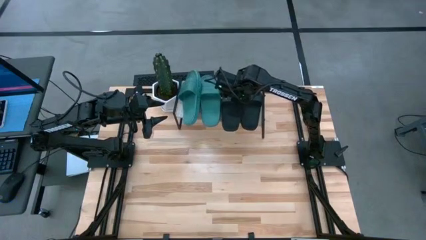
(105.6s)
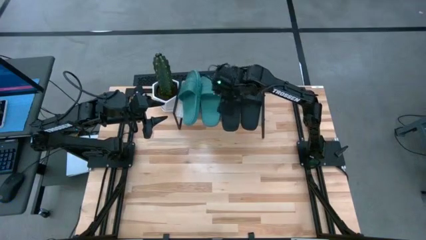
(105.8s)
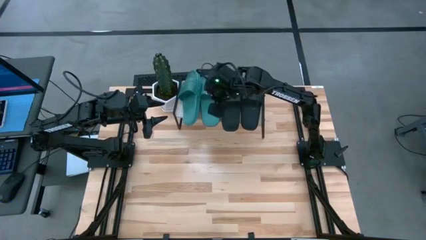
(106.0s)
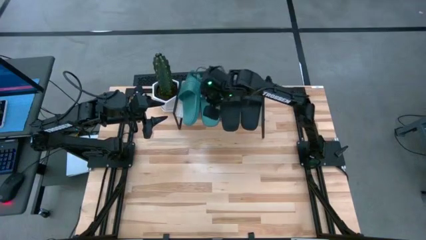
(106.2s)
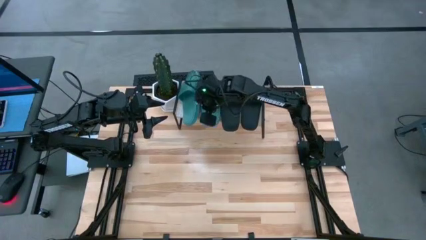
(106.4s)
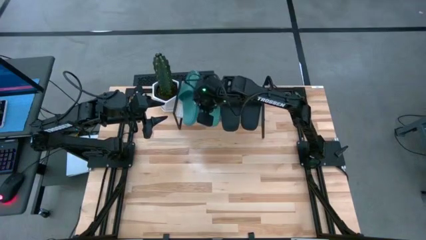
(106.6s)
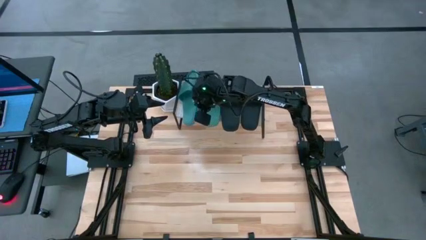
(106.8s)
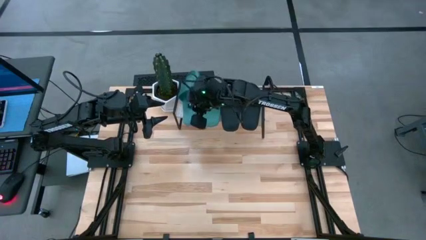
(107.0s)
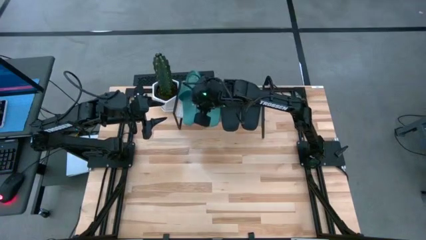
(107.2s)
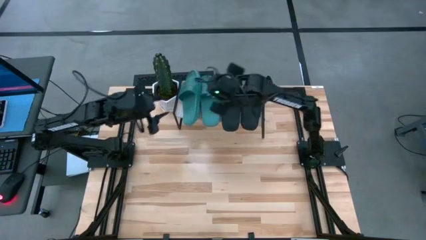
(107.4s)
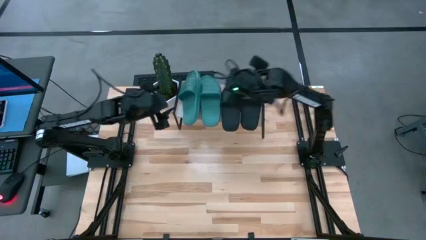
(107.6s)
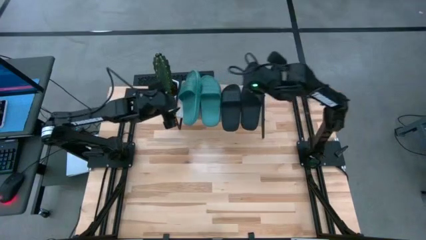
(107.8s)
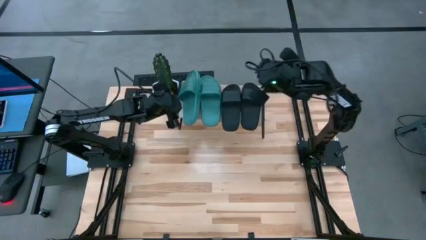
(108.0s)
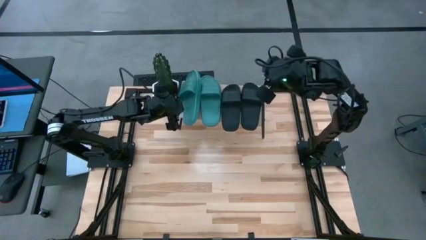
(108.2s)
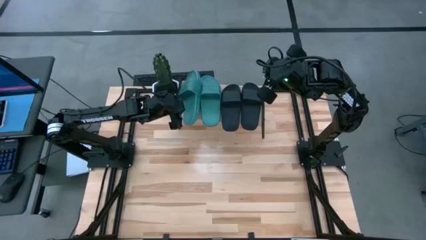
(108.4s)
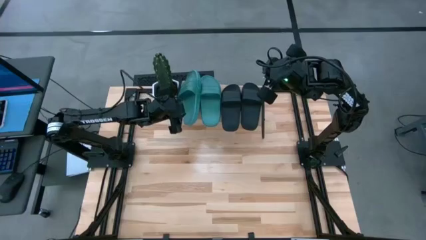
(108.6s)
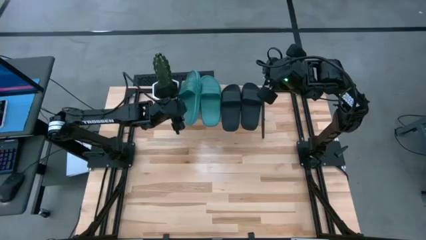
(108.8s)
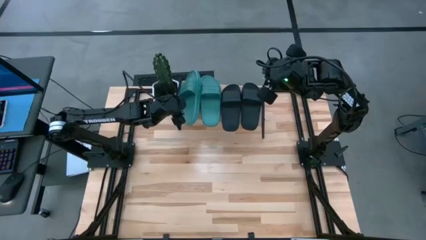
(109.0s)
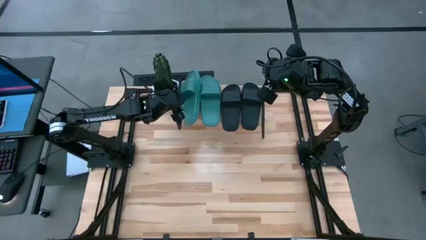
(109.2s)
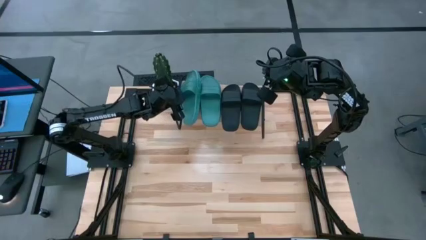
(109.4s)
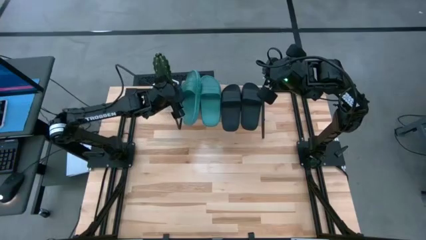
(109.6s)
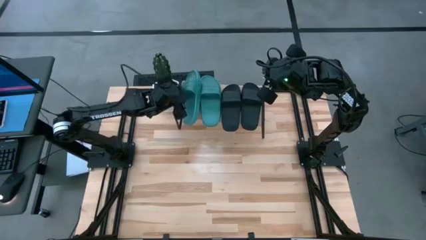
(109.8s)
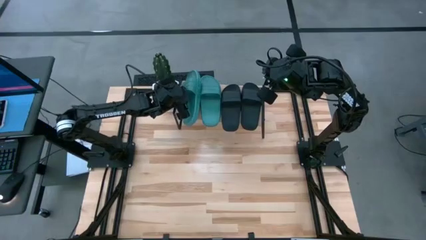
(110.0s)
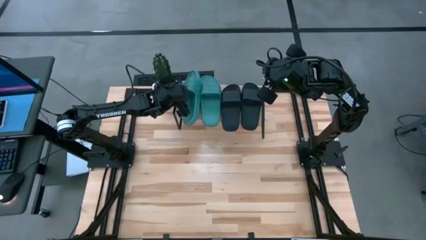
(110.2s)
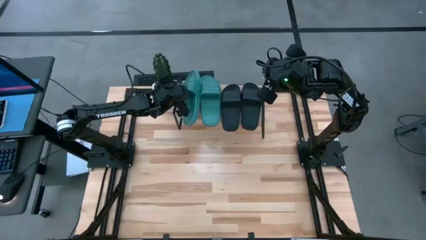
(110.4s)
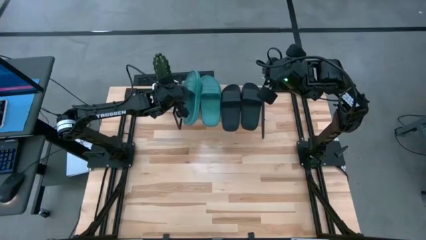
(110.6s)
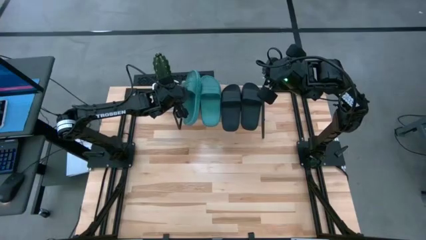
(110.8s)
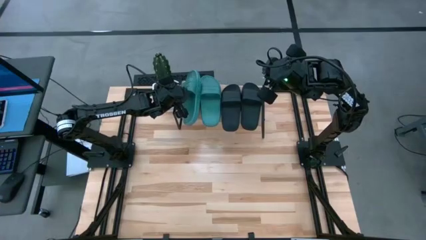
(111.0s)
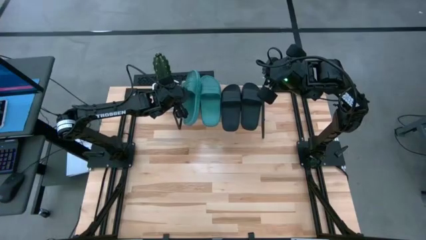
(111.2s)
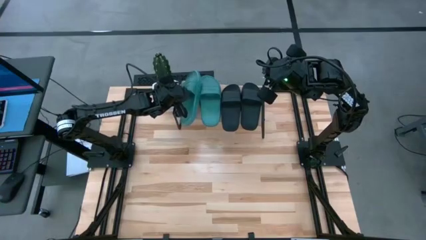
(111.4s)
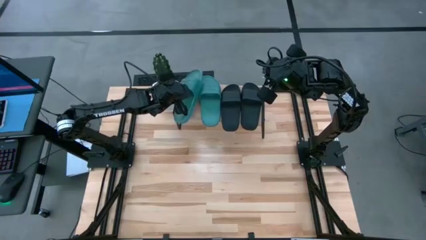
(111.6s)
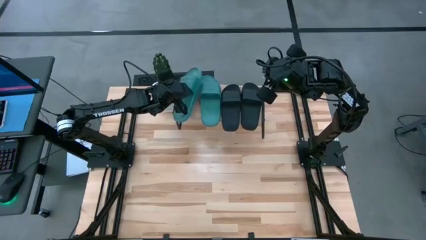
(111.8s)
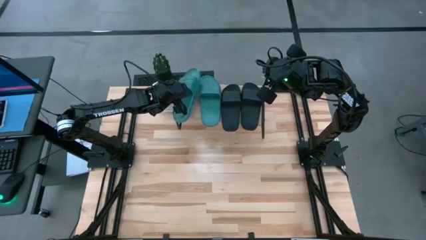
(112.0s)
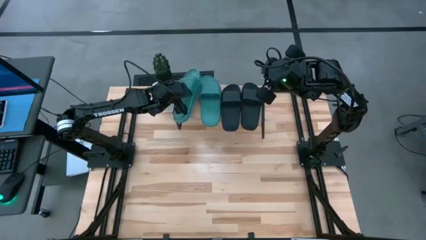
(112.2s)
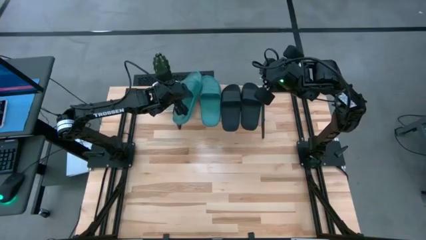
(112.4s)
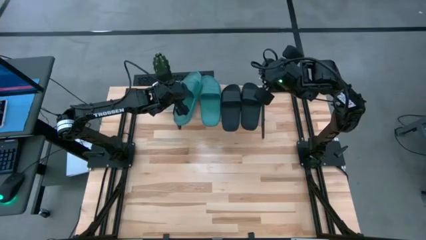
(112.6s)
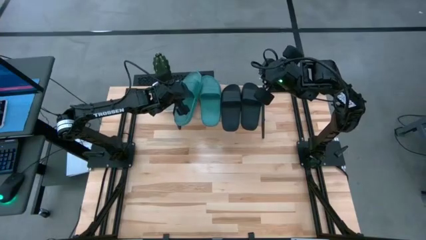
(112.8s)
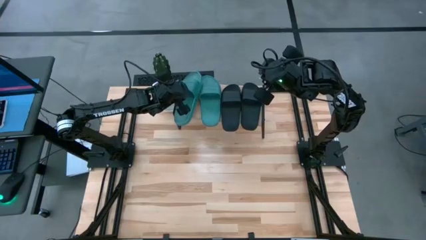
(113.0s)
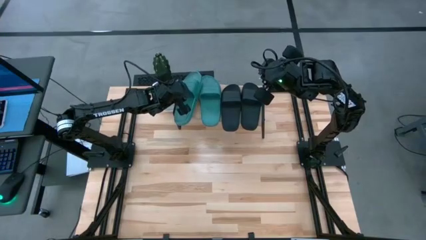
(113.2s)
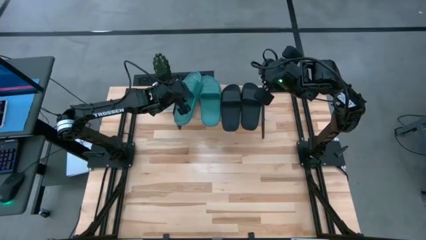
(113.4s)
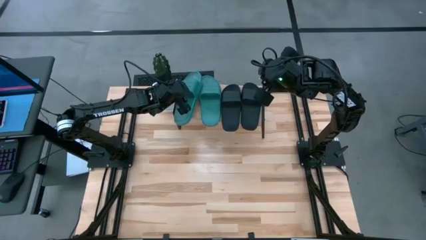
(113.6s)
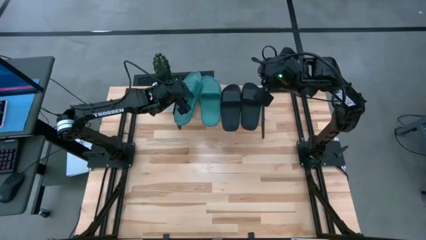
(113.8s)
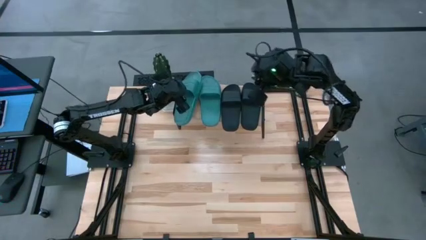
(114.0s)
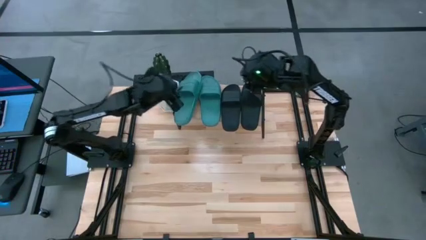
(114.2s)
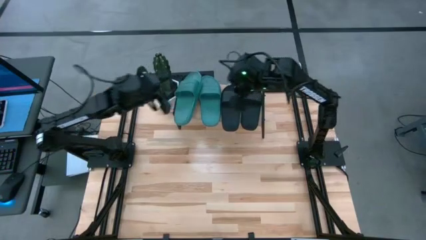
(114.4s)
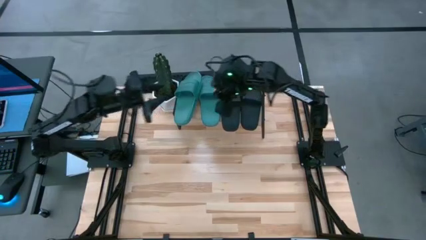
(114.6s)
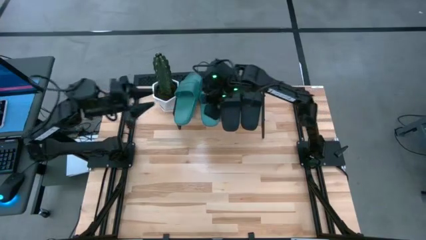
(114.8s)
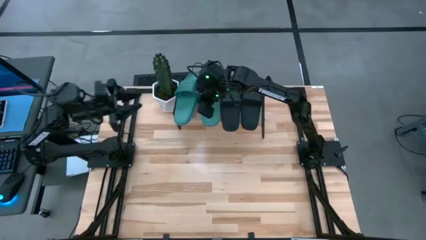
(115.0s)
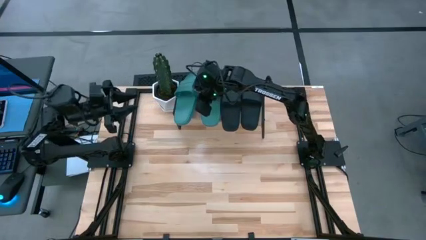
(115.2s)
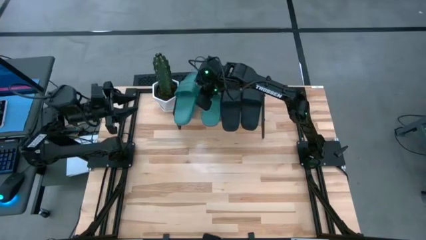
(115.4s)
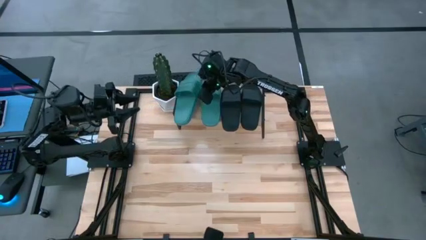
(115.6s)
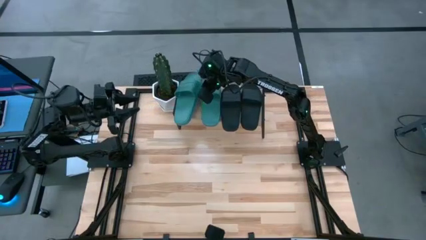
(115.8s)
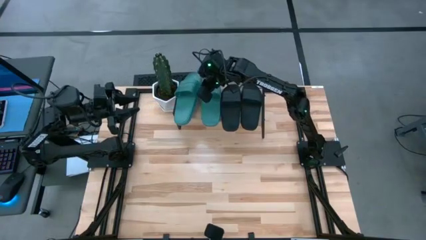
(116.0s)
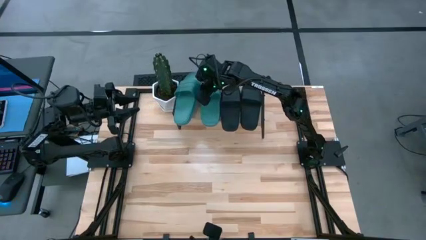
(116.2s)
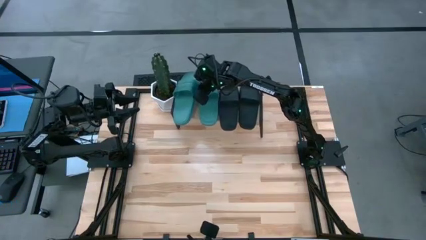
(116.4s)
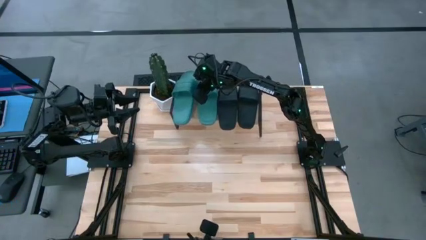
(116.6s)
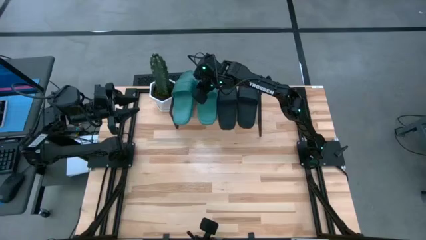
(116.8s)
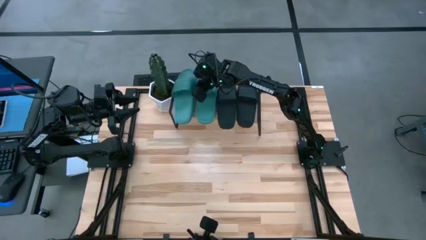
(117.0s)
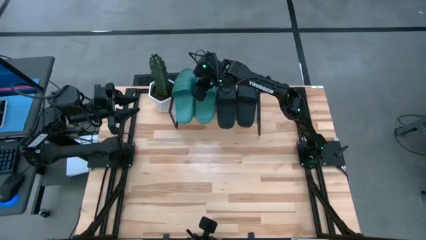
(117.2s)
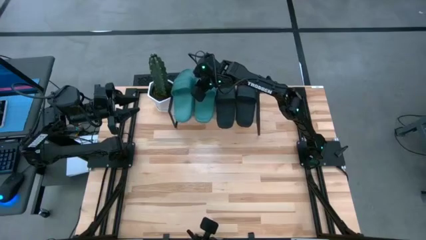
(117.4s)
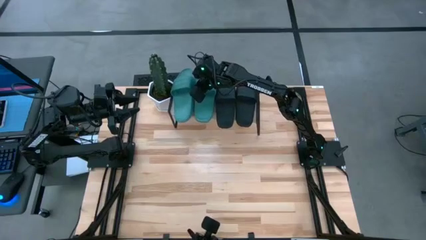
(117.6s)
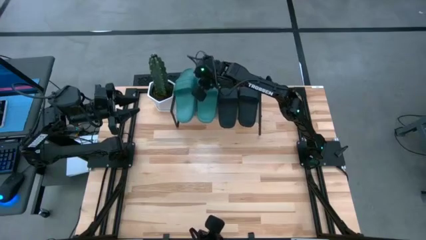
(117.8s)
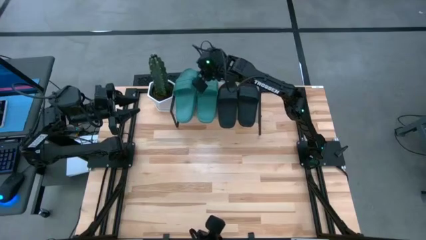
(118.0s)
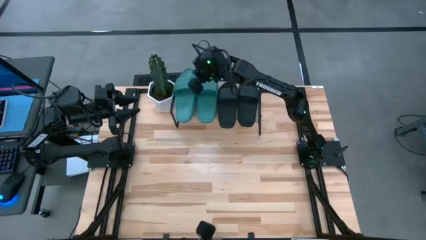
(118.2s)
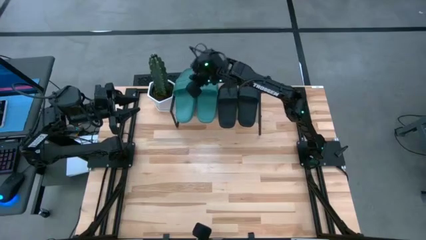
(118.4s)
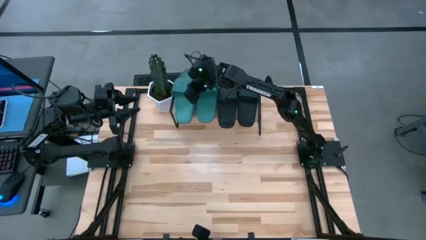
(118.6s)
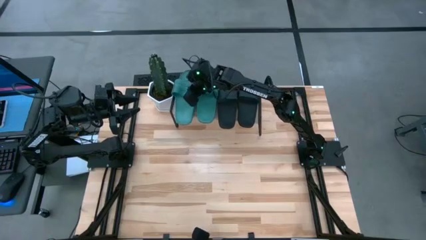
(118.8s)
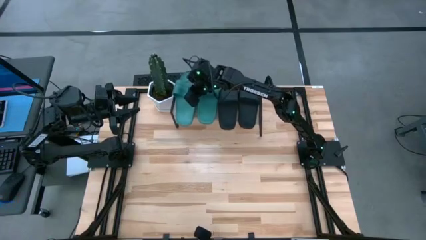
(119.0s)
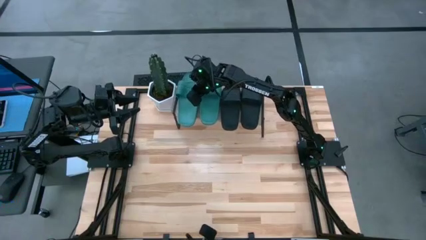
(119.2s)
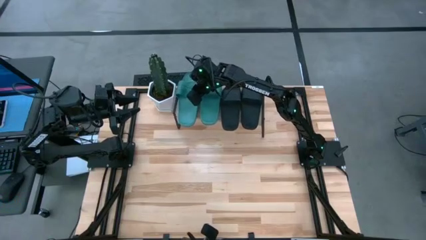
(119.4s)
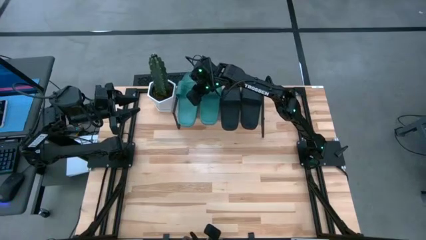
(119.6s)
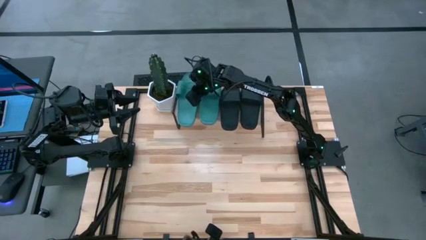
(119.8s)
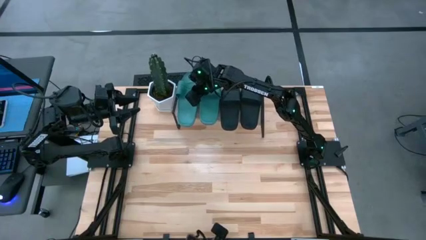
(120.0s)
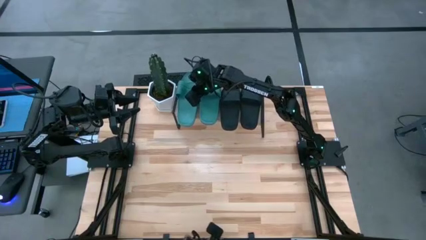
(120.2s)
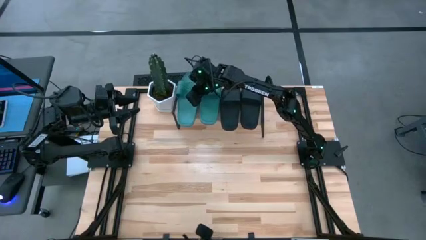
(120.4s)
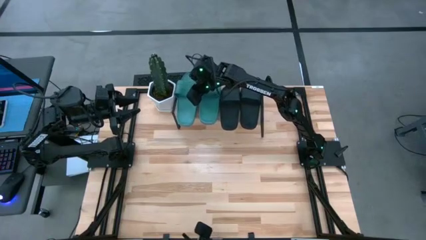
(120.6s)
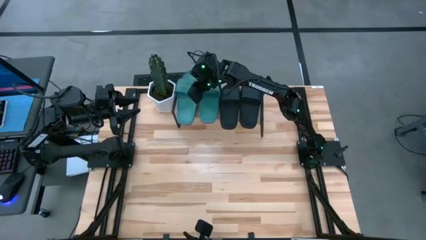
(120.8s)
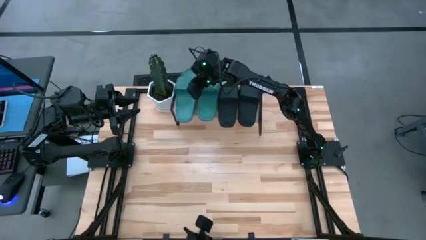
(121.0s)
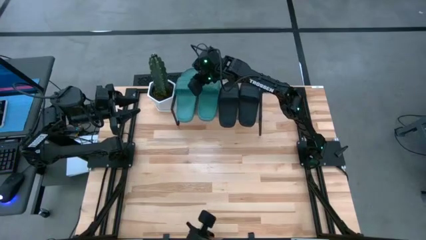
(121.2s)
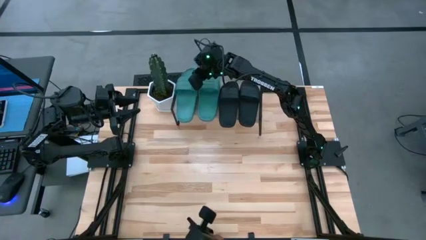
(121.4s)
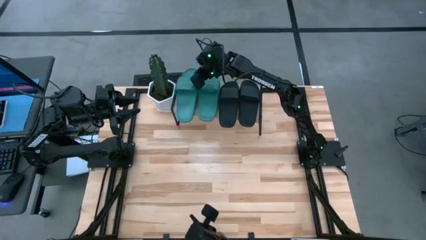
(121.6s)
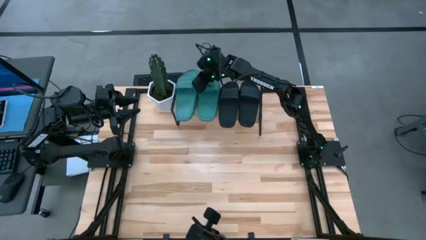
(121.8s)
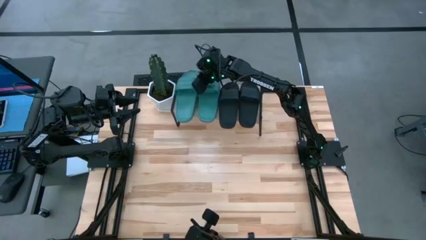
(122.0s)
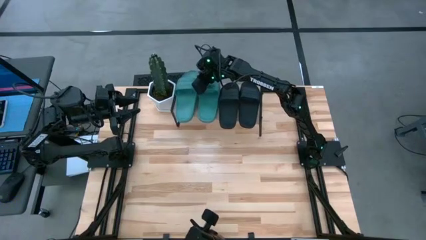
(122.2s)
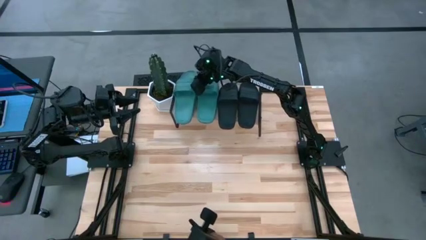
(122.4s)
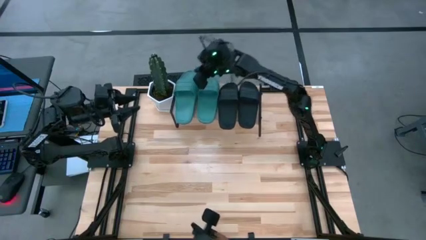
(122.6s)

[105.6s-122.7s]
Task: Pick and place slides into the shelf
Adjust the slippers on the shelf
